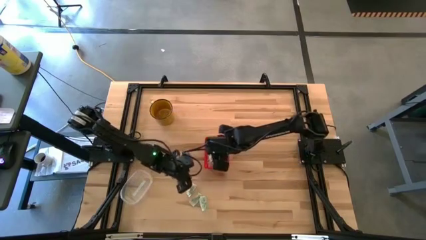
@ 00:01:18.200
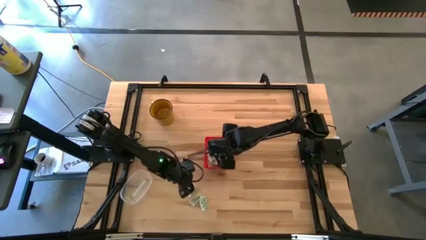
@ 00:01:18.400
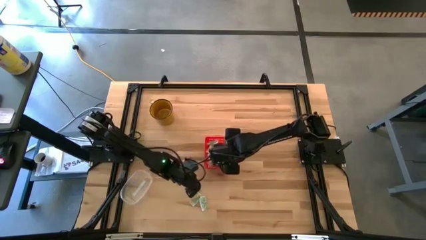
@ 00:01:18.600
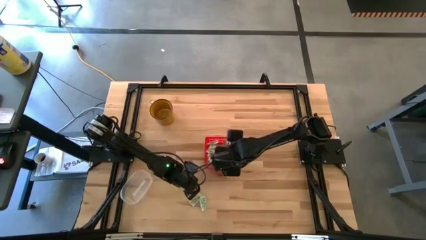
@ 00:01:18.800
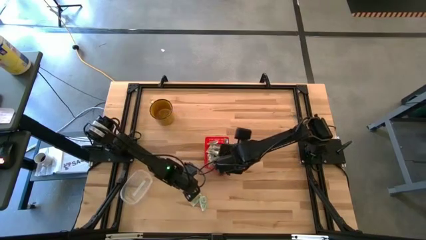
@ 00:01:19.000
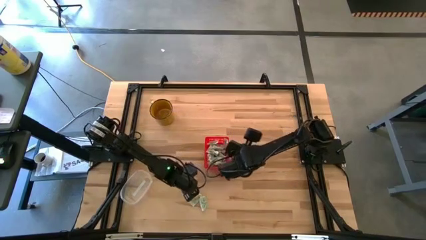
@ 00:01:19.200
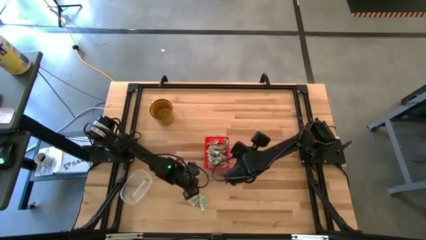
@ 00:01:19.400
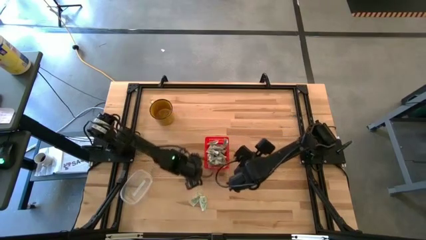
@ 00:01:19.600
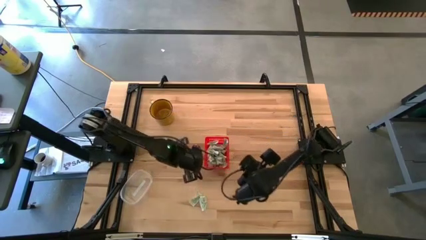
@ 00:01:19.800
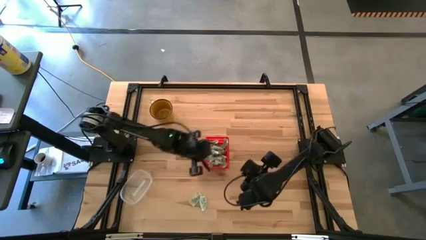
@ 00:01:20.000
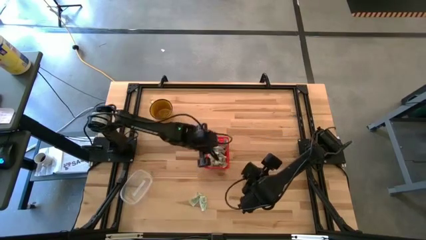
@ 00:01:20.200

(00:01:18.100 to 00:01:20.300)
Task: Pick and place Stevia / Truvia into bins
Put the white stevia packet into the red basket

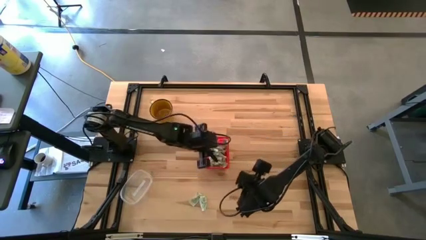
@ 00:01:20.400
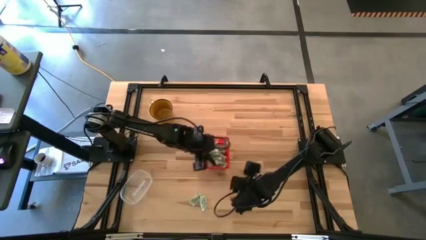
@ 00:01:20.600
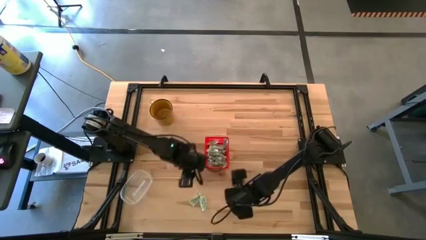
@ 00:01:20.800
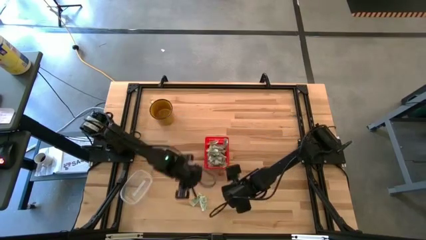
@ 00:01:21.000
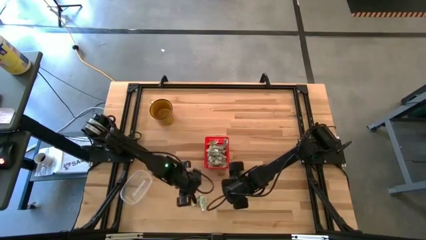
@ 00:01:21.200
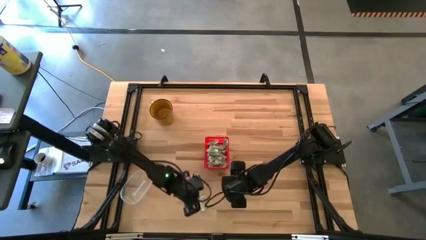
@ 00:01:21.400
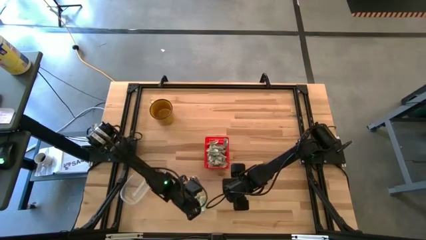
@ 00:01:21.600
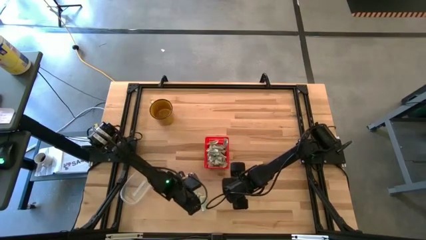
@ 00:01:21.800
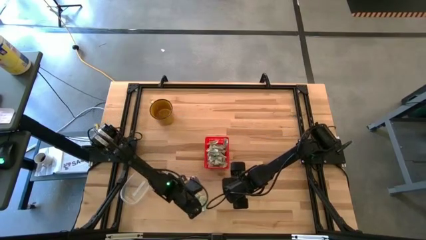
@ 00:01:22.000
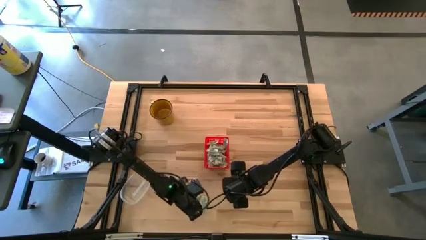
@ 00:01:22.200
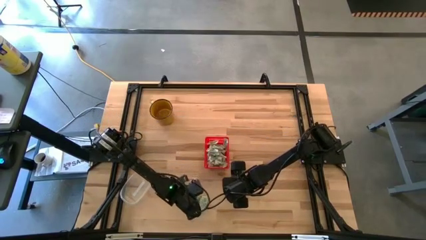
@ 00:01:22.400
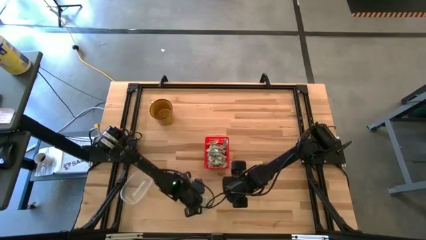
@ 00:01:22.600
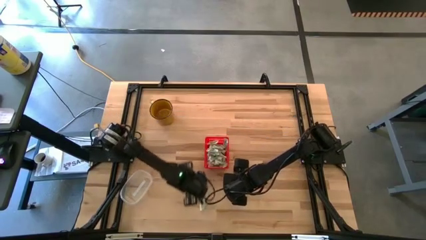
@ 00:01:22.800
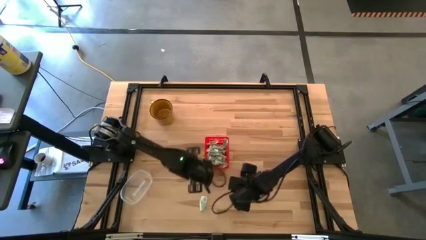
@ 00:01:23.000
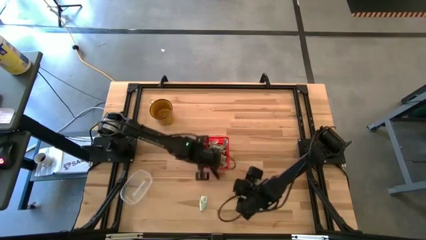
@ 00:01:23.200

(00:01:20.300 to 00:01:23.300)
Put the white stevia packet into the red basket

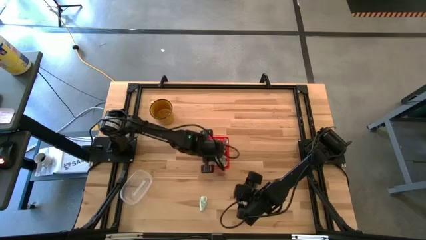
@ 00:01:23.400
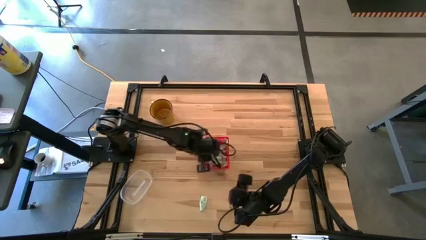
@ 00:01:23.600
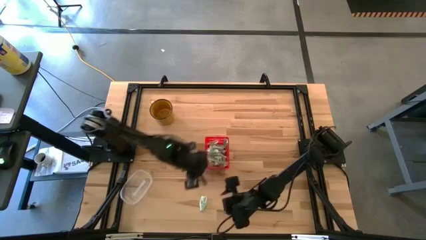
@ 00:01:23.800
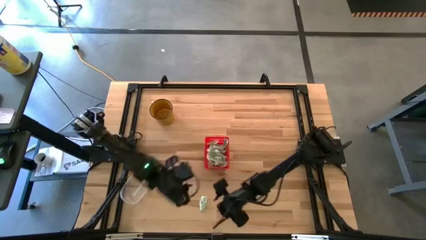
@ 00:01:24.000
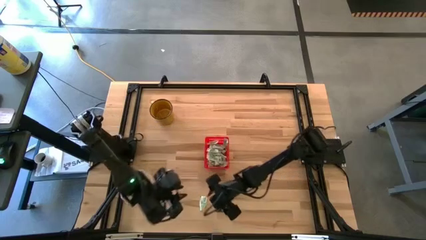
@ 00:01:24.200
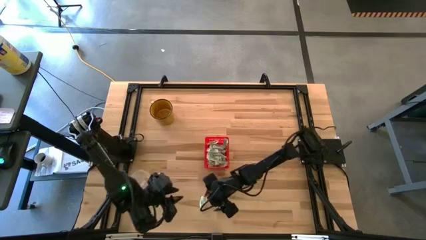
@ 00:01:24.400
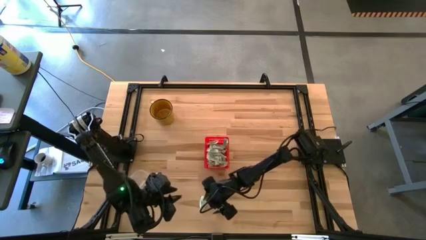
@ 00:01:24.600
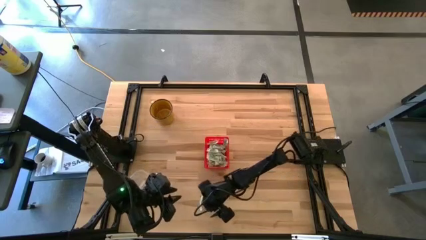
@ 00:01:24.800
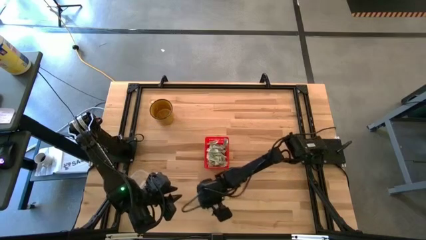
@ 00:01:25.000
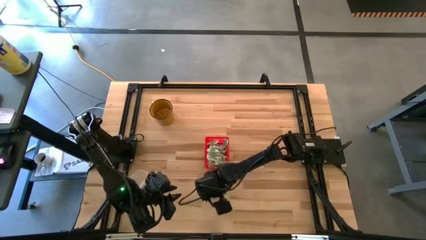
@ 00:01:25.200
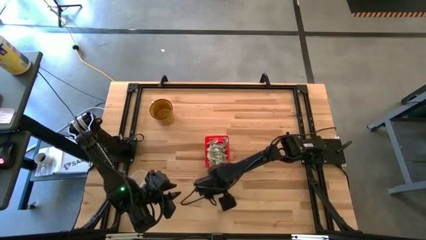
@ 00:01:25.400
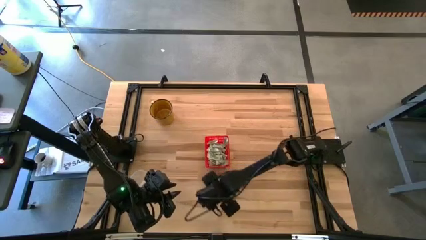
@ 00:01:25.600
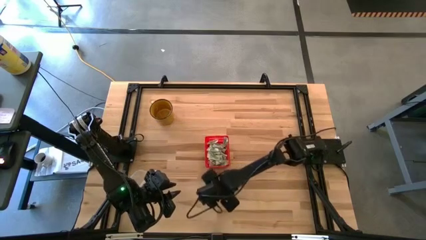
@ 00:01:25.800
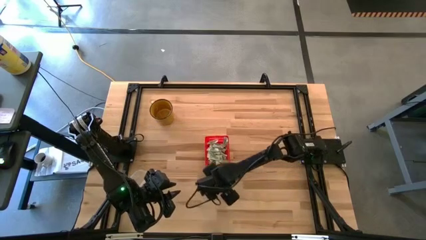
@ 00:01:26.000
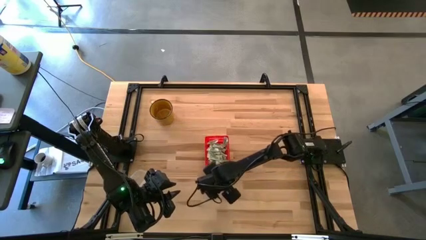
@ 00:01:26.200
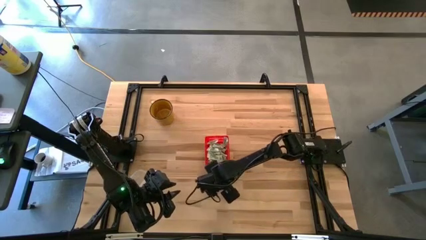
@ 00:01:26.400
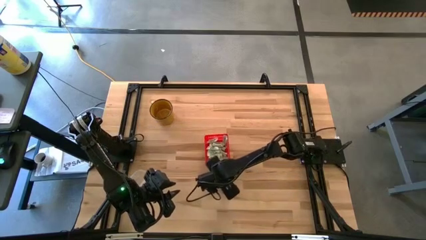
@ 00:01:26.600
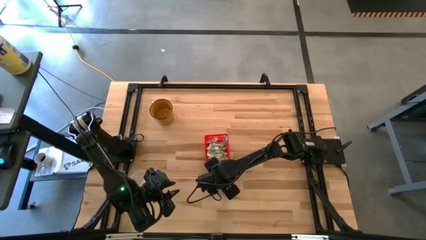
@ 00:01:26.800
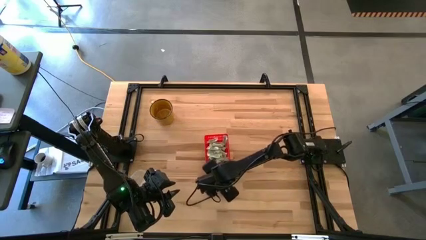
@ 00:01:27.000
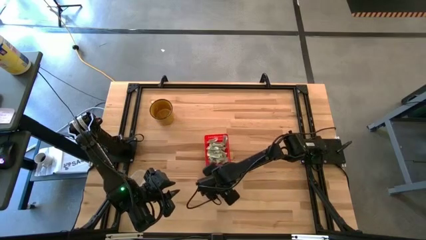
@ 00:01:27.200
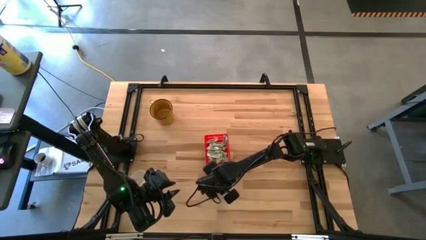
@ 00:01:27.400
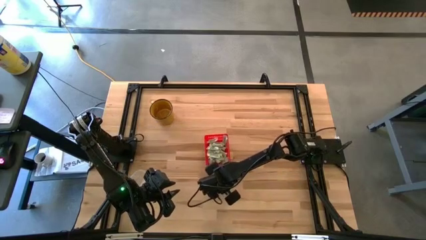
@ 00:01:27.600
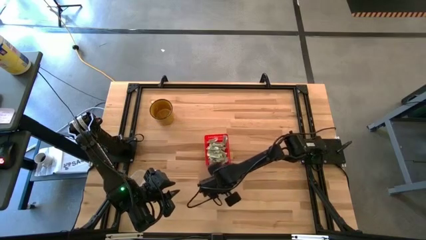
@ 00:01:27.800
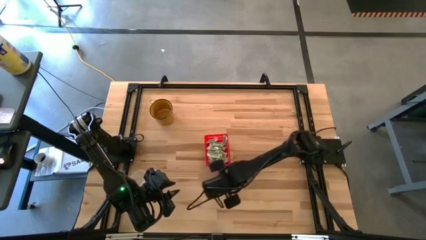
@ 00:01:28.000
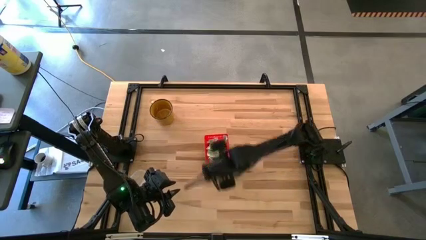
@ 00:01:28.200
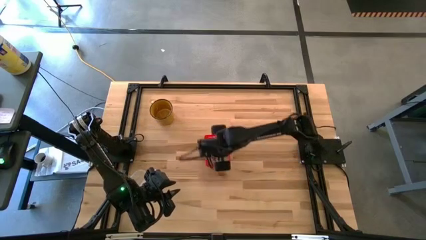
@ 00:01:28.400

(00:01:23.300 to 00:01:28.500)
Put the white stevia packet into the red basket

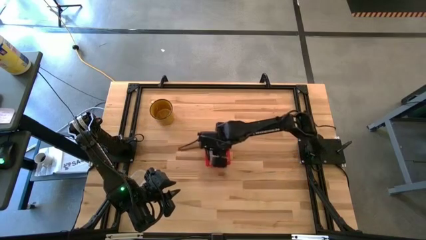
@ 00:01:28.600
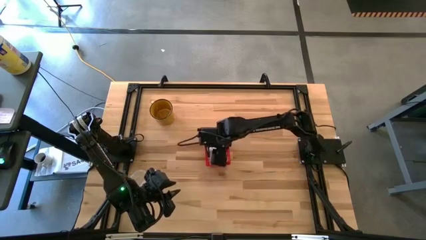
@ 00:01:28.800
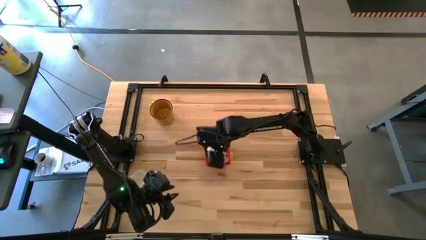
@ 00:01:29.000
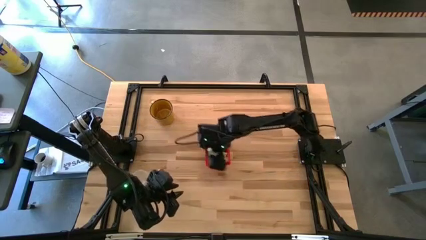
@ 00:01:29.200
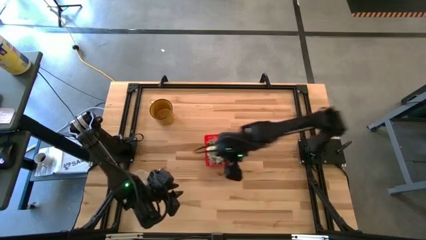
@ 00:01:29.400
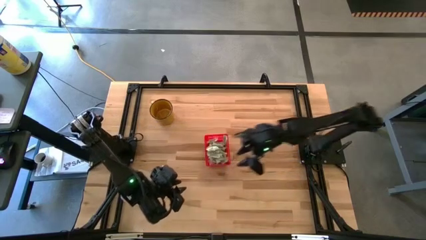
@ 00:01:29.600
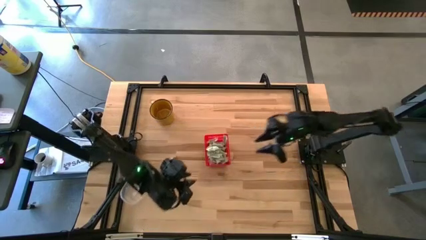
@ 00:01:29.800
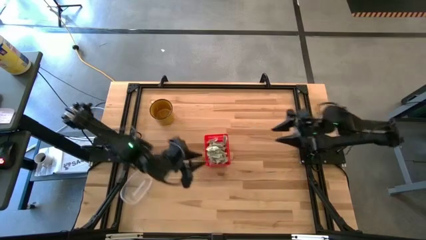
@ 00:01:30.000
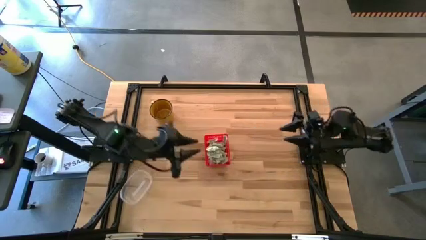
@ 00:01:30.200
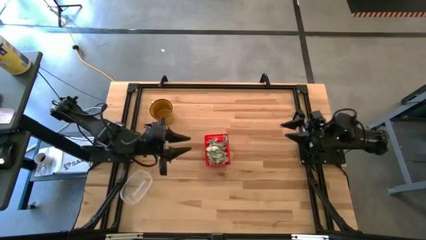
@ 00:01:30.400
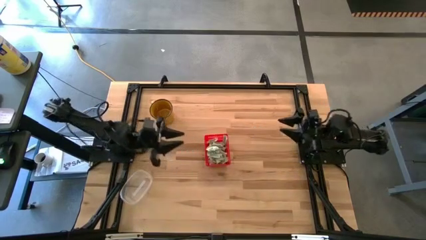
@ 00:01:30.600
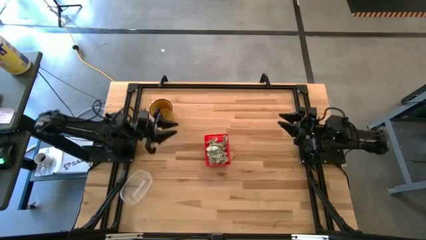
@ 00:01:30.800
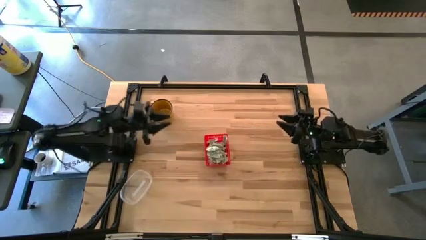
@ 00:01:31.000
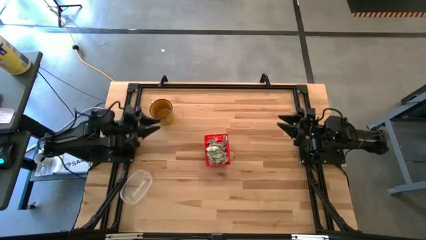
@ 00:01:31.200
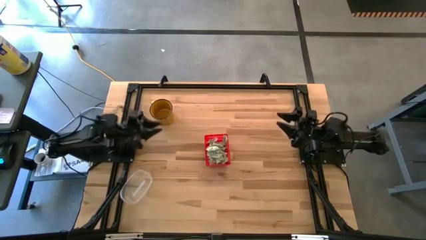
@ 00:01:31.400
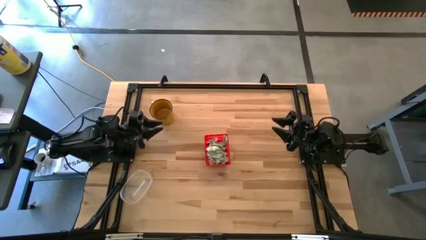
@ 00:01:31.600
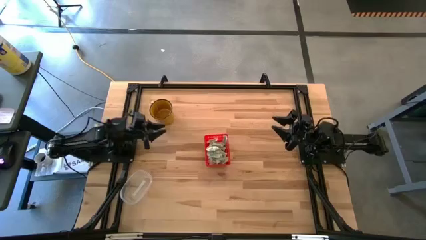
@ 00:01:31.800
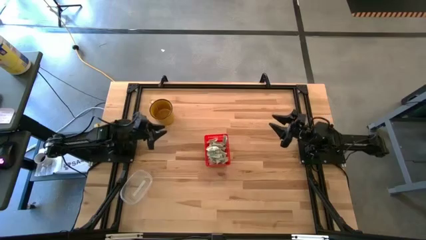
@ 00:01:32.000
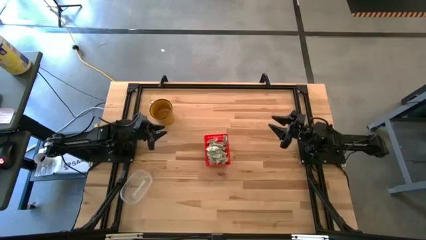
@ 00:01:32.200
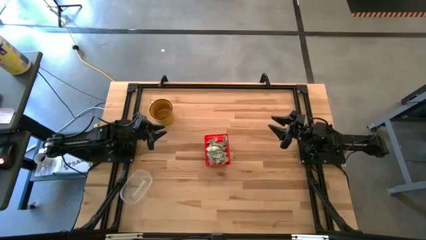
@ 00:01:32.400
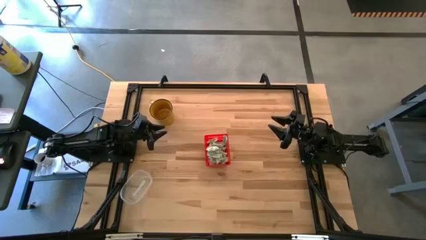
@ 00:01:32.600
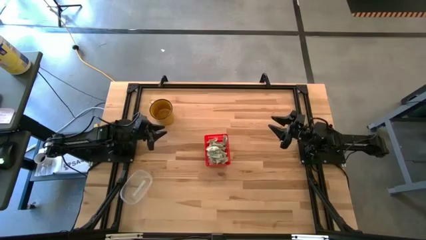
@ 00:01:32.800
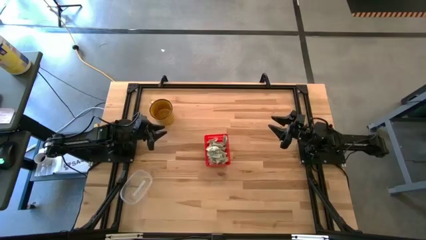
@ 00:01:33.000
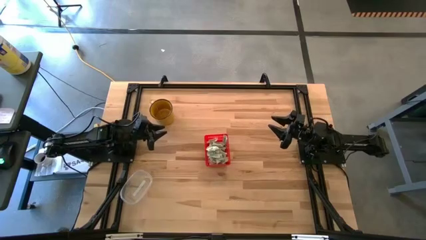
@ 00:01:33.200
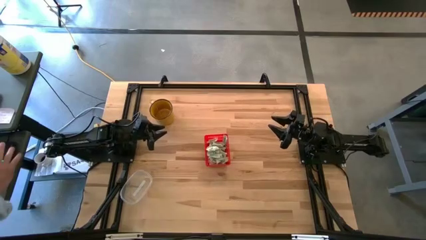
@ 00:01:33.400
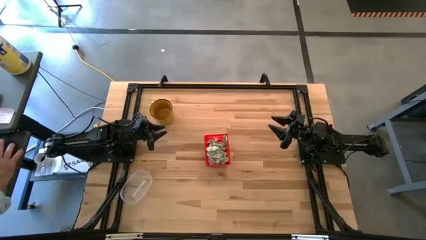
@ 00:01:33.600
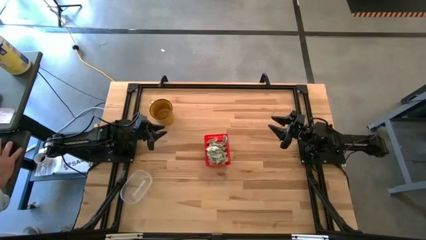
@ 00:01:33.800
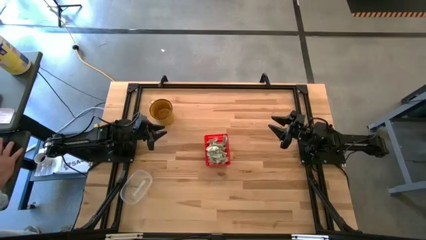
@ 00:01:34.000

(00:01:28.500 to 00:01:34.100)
Return to Home Position

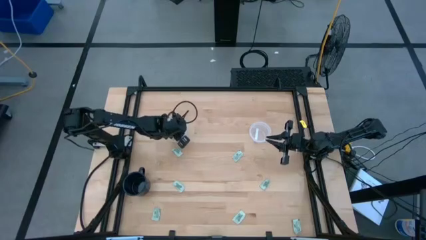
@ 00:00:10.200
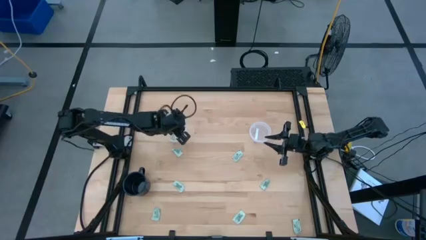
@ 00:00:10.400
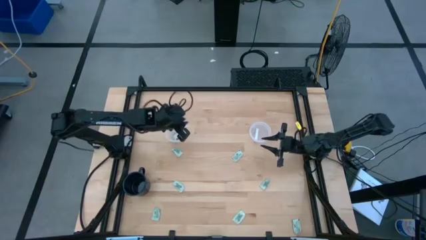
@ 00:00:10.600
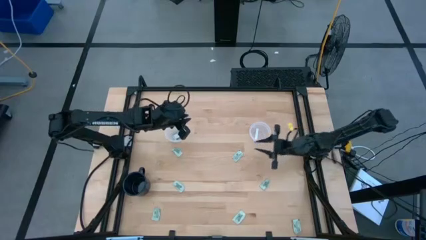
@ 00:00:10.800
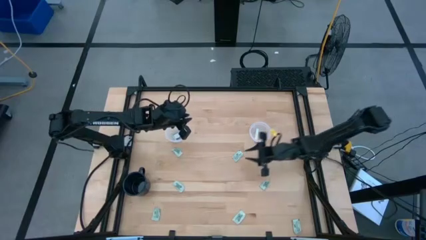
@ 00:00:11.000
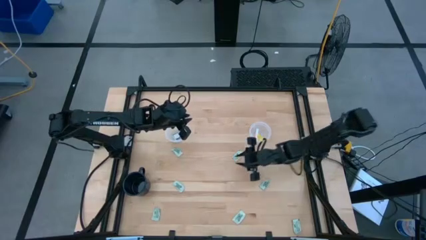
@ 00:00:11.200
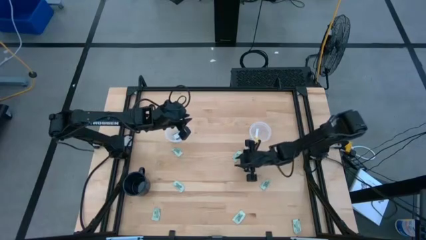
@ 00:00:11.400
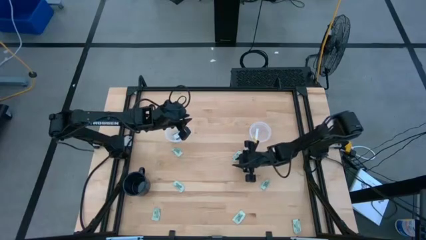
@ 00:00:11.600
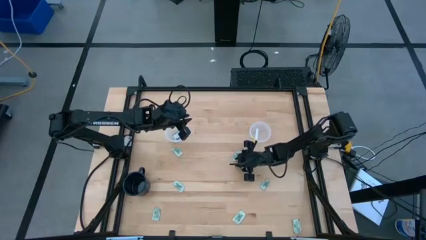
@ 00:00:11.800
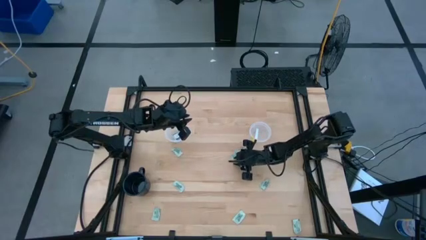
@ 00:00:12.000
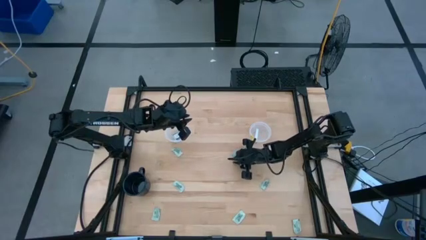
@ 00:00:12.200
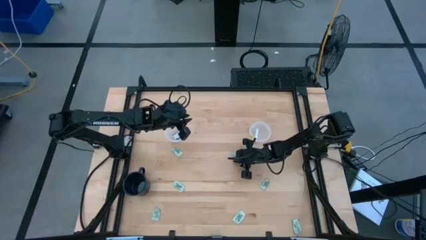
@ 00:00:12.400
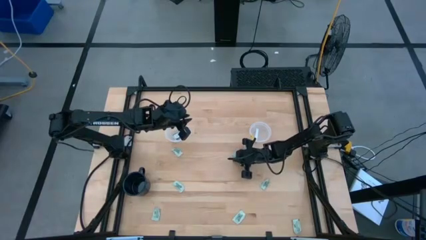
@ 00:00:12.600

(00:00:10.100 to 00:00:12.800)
Task: Pick and place Stevia / Truvia into bins
Put the stevia packet into the right transparent container
